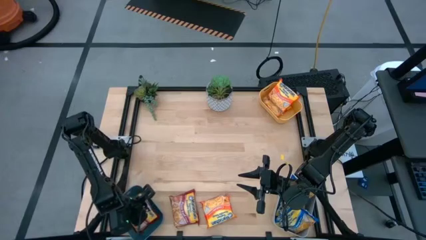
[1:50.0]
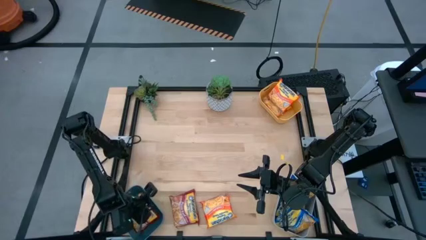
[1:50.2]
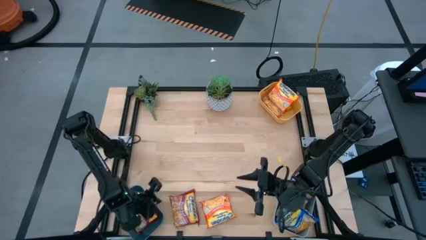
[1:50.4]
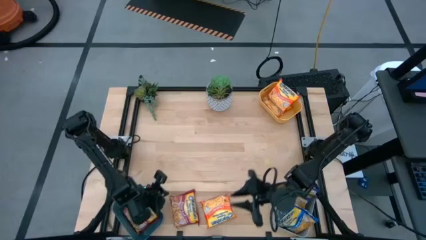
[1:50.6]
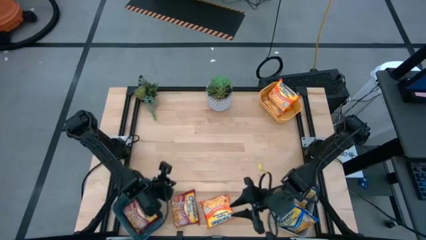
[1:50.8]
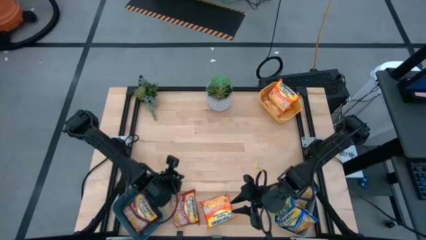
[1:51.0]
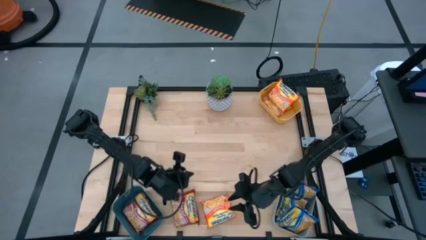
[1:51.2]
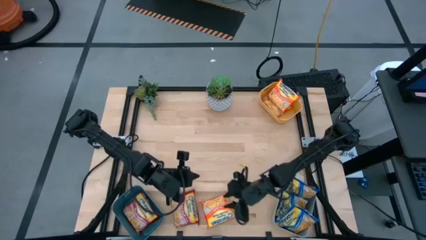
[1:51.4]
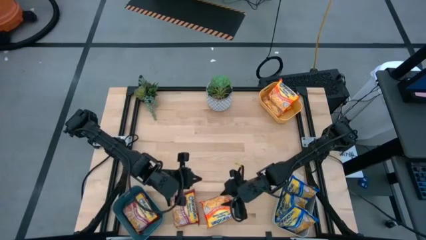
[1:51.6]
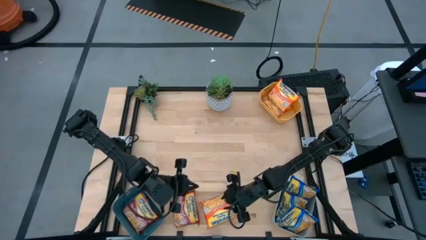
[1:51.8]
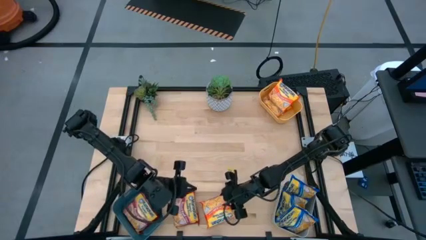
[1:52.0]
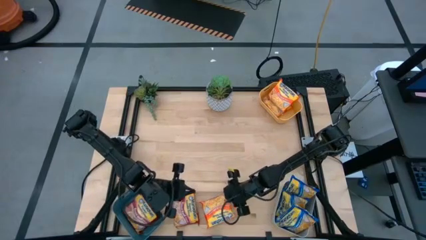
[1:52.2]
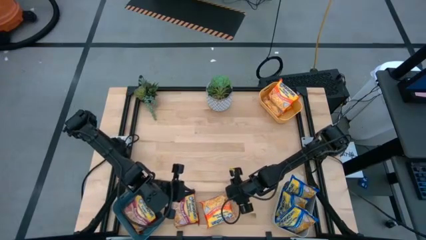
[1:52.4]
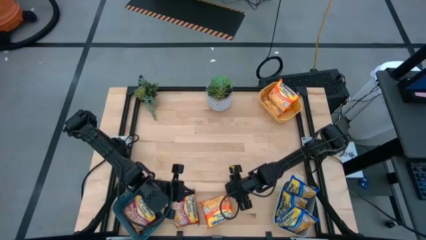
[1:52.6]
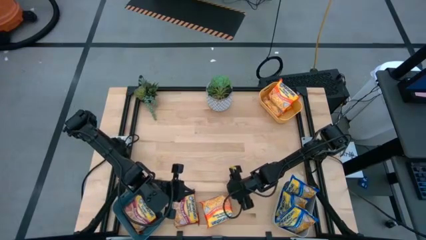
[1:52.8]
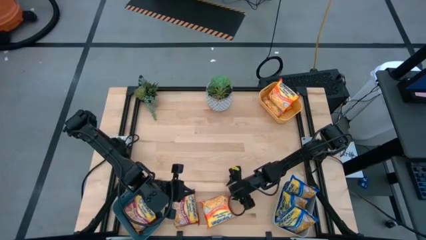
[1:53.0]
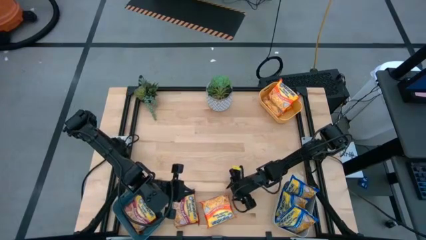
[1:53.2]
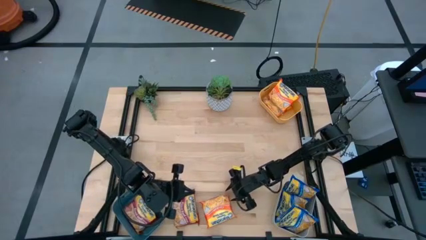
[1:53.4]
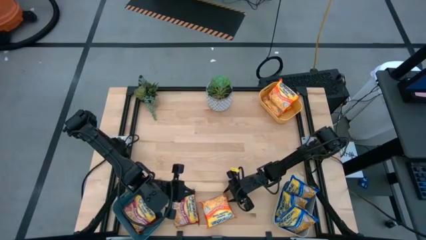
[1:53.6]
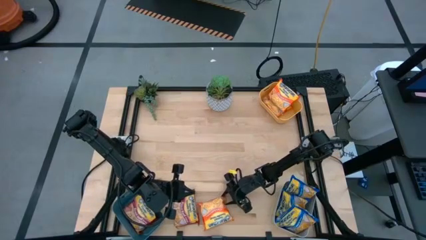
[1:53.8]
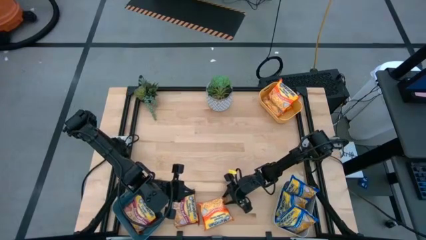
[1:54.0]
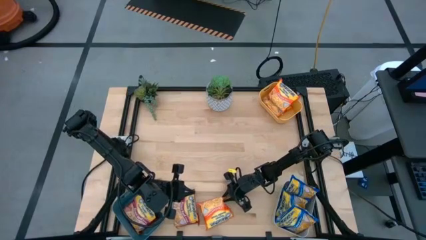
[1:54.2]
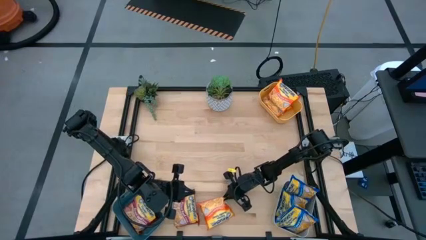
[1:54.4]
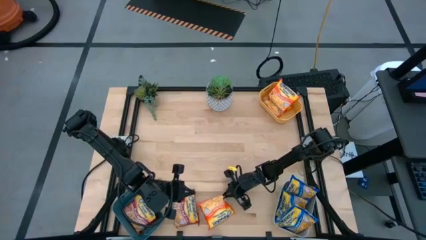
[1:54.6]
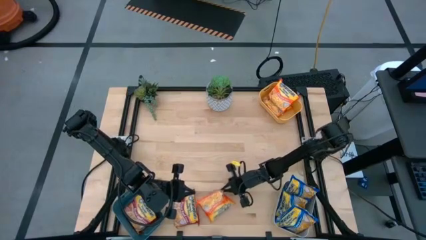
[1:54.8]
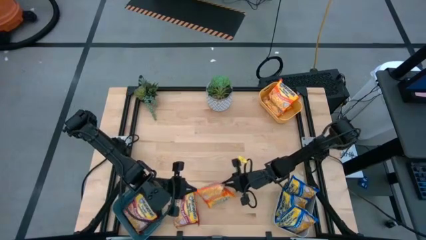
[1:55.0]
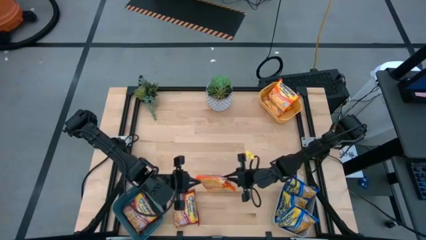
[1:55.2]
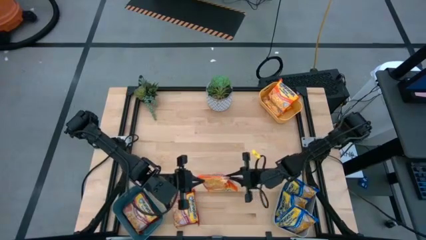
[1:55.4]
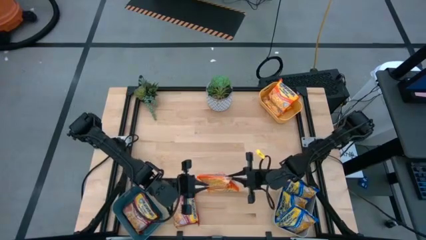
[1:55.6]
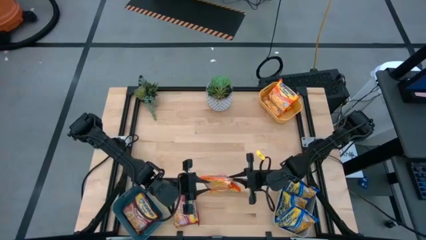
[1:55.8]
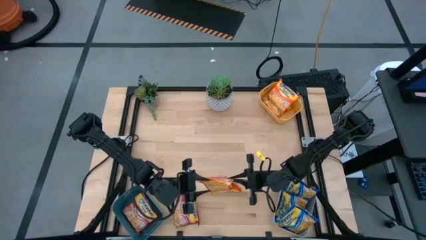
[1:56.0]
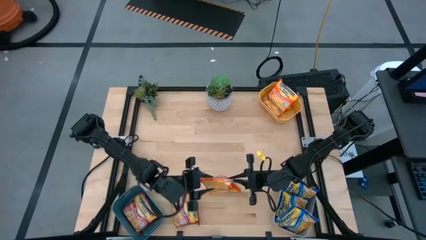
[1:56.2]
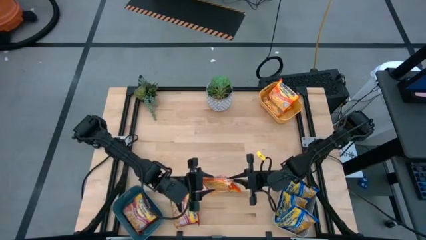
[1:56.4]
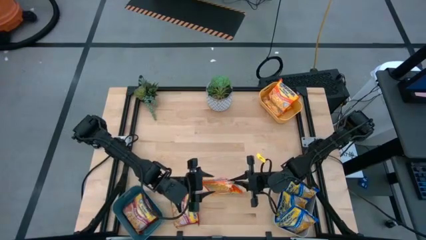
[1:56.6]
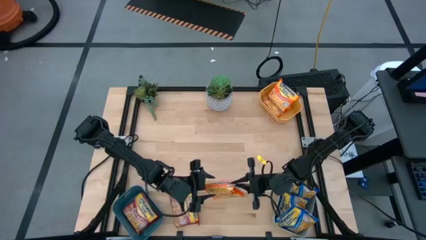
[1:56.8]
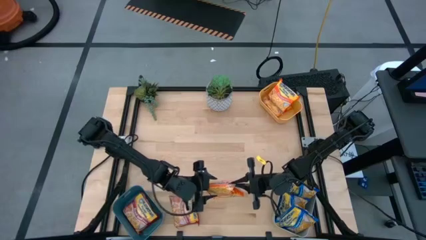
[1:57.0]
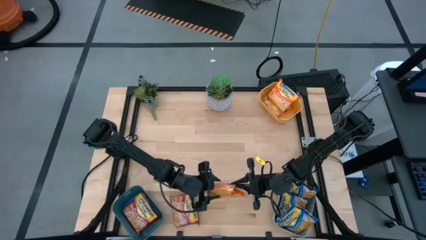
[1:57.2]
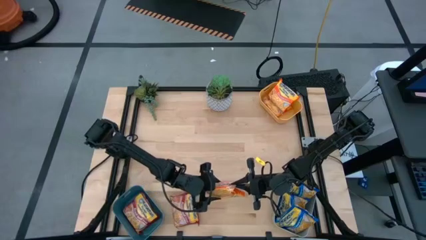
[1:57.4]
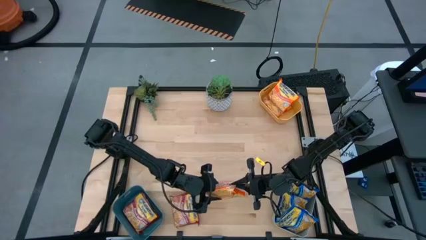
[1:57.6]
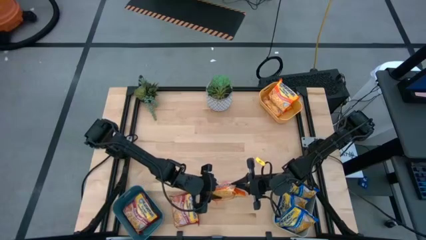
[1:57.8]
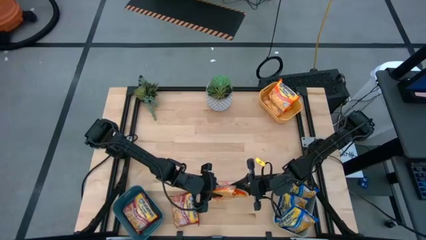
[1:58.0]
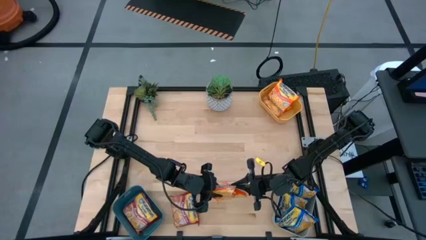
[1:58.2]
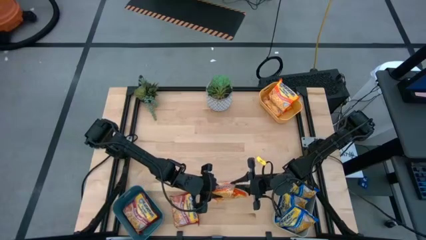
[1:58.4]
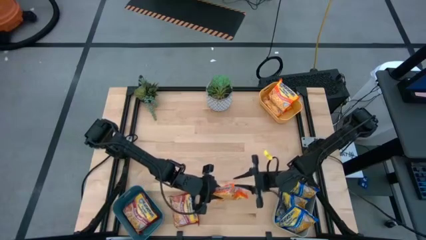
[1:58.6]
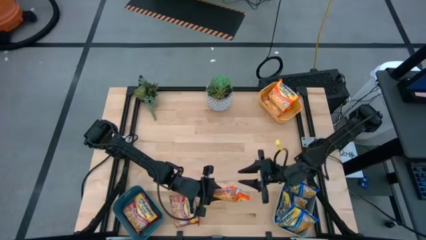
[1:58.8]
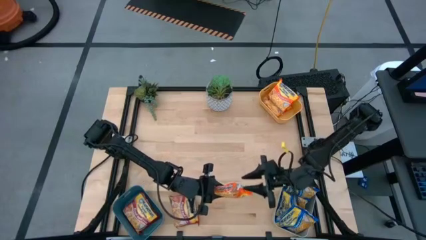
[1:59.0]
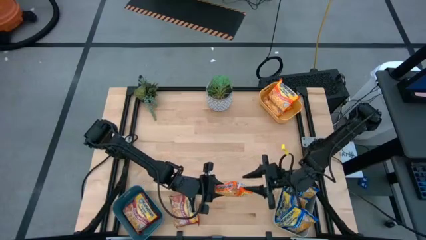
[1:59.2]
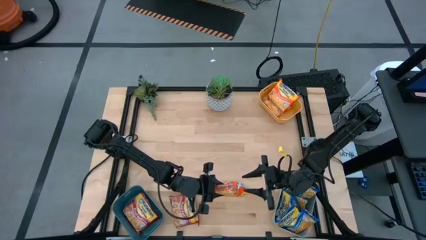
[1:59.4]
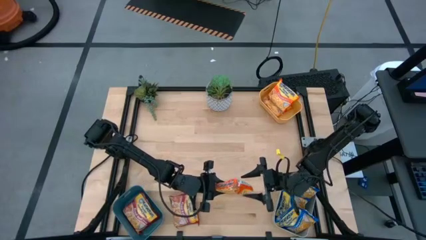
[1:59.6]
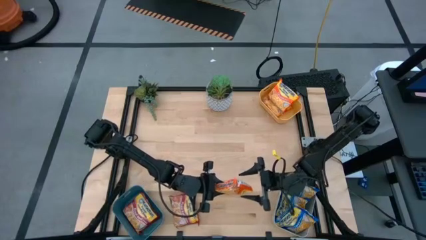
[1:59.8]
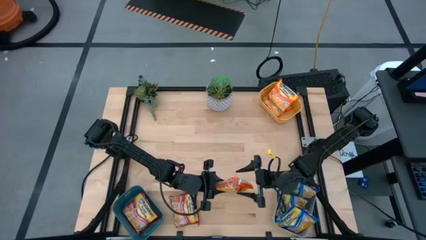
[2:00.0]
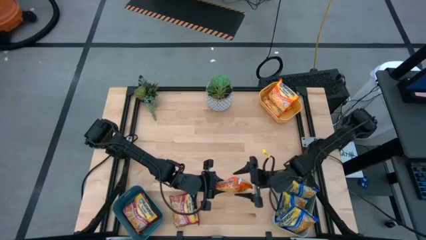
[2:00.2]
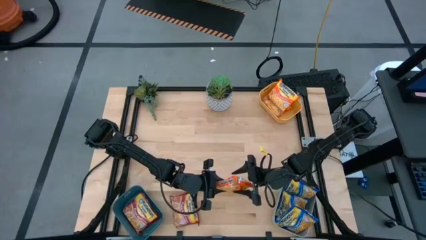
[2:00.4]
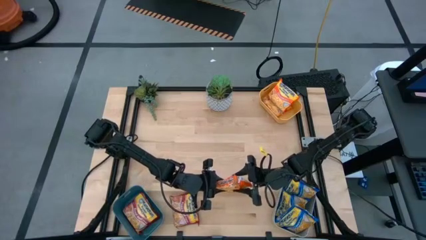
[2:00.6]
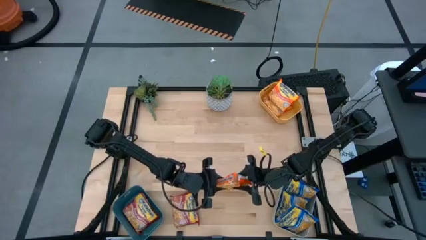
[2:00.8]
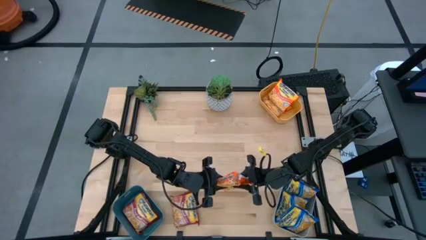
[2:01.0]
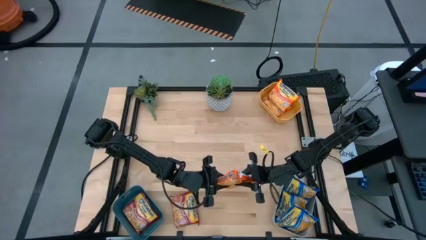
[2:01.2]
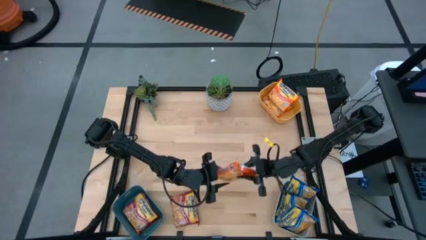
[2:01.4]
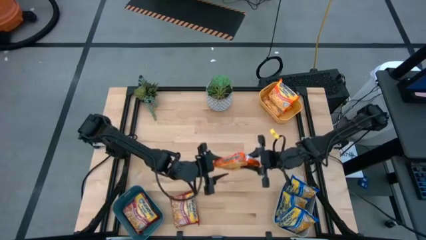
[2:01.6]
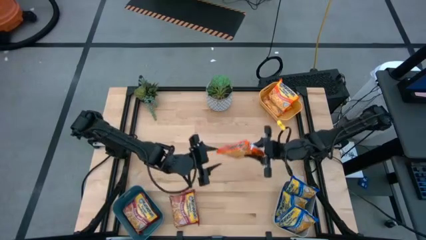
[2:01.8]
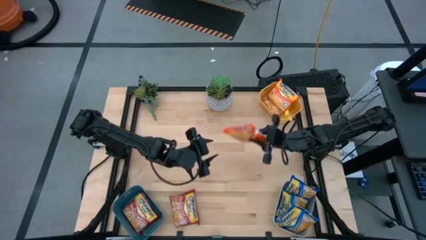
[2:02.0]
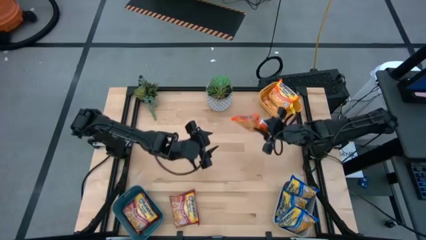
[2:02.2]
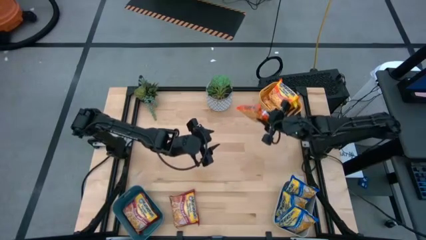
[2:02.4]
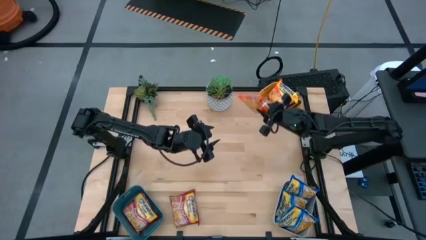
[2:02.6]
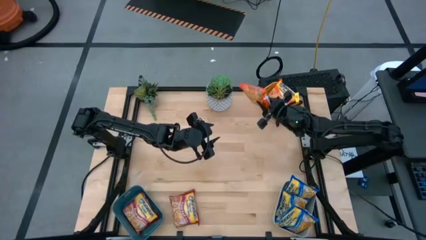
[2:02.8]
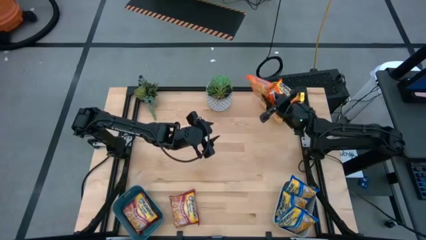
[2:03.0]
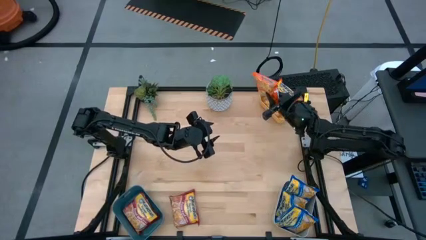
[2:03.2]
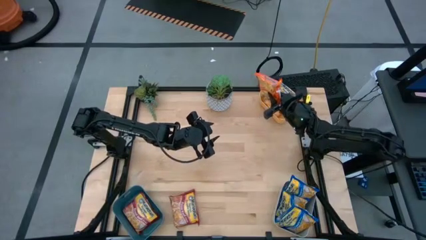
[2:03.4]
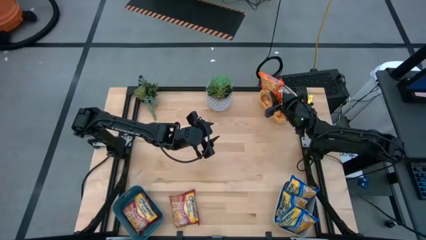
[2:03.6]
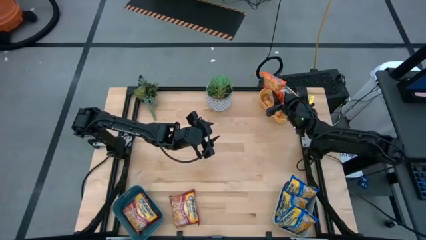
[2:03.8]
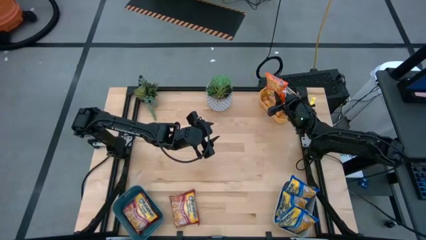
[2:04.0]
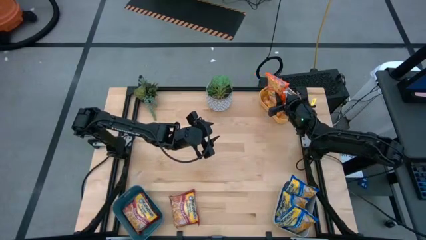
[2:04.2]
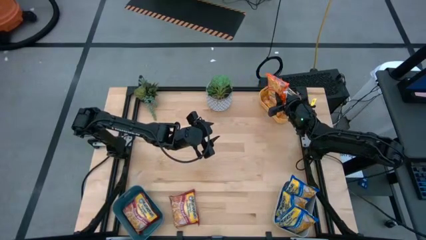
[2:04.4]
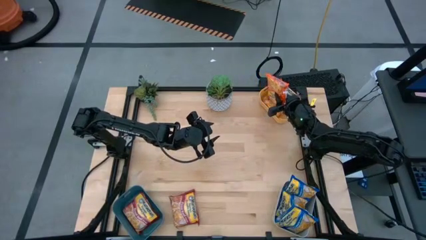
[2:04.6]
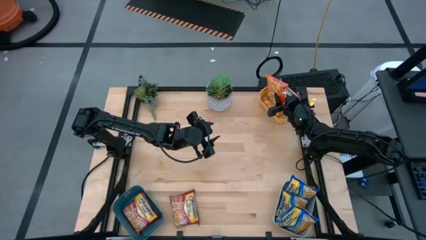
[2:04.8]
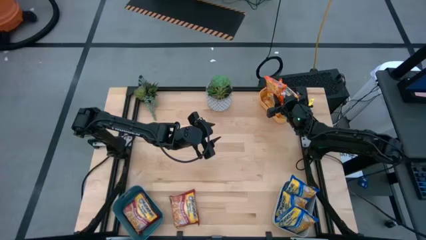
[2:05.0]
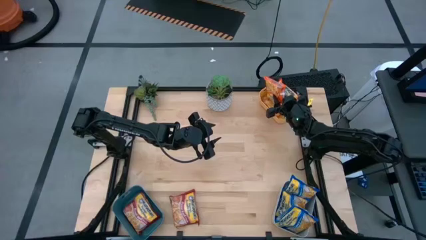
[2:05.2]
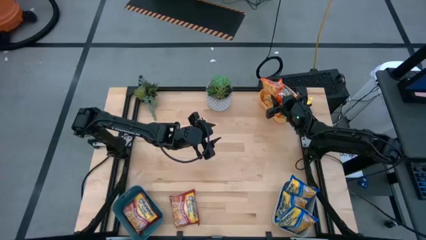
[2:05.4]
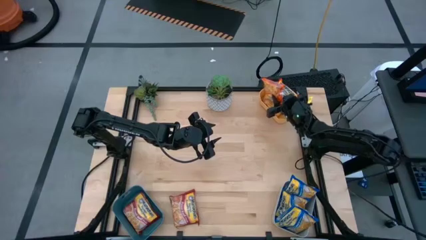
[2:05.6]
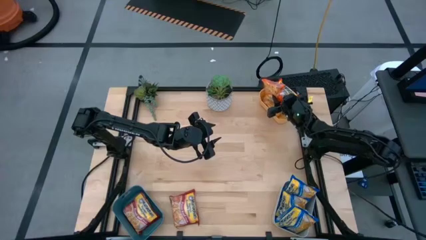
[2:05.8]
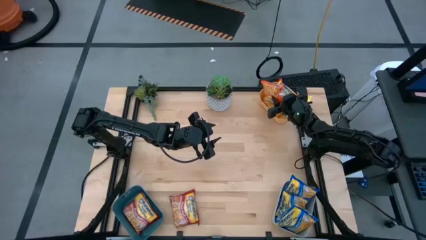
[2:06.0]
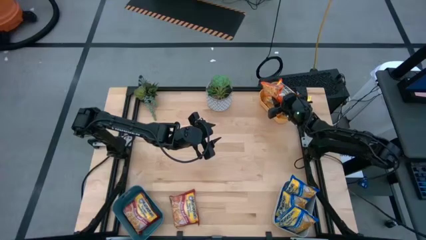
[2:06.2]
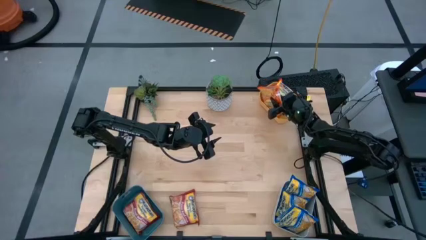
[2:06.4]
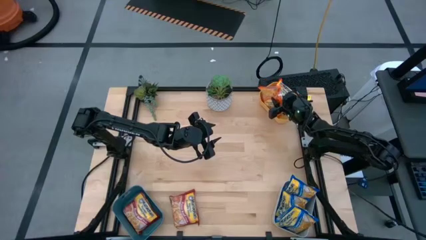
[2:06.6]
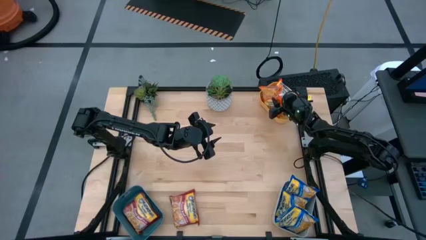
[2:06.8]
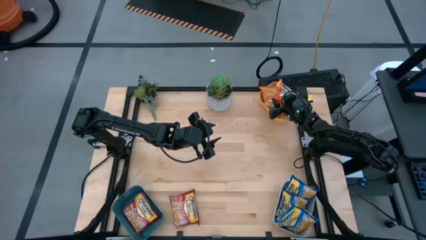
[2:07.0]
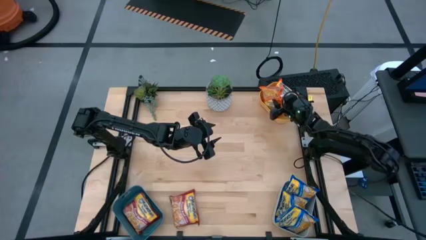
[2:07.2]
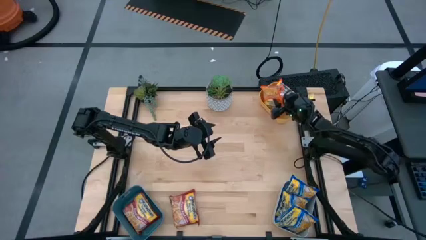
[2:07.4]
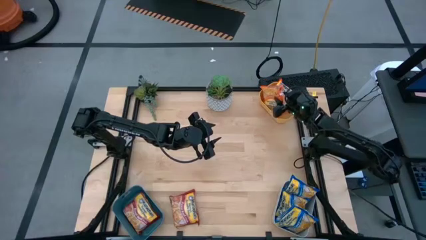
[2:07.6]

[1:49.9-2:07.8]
Task: Sort Maruchan noodles
Put the orange noodle pack into the yellow bin
